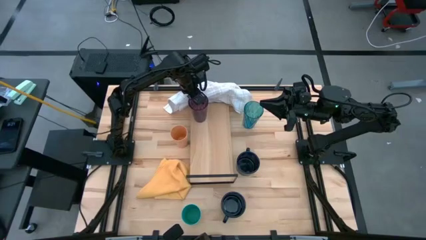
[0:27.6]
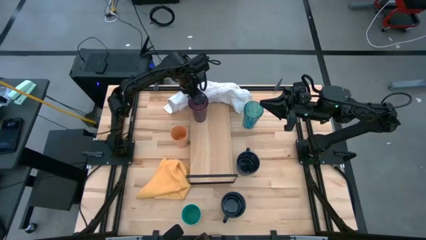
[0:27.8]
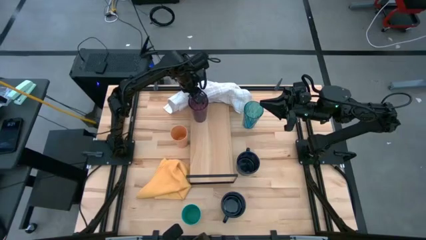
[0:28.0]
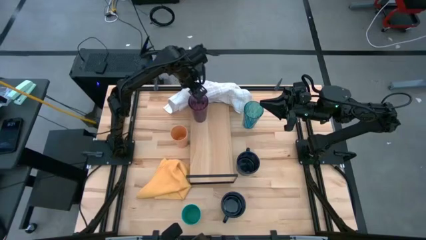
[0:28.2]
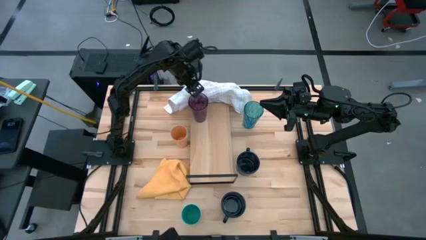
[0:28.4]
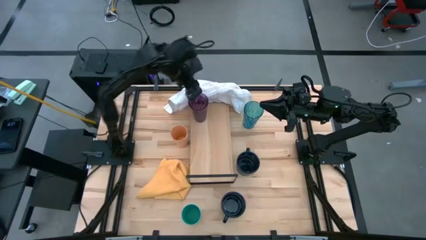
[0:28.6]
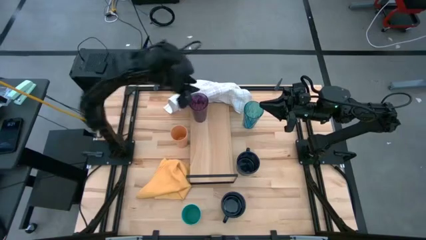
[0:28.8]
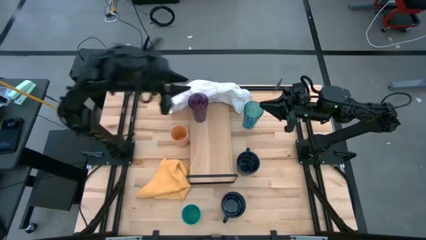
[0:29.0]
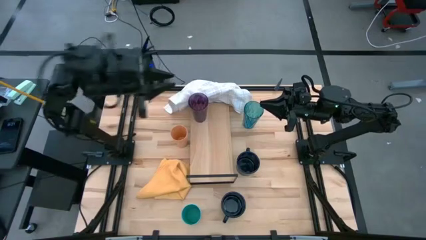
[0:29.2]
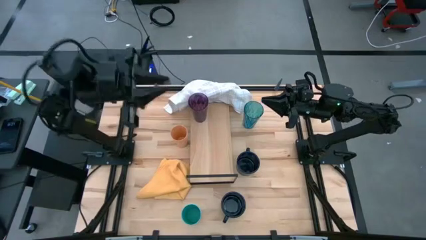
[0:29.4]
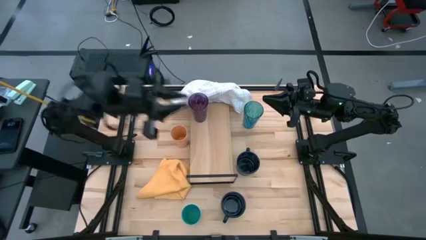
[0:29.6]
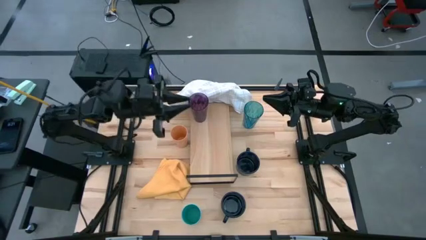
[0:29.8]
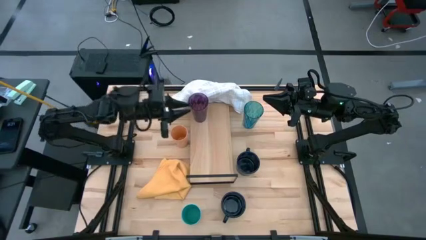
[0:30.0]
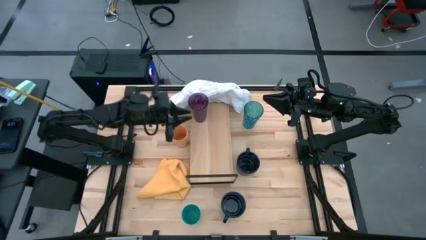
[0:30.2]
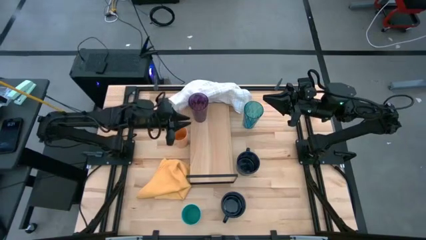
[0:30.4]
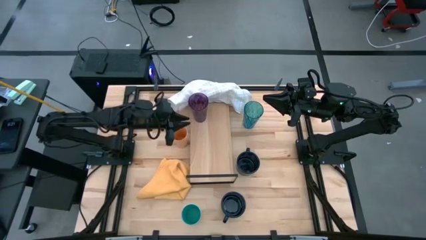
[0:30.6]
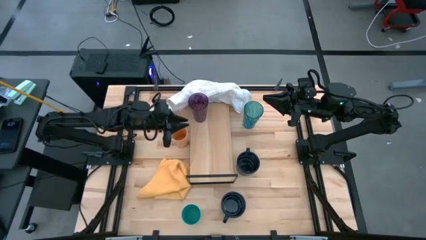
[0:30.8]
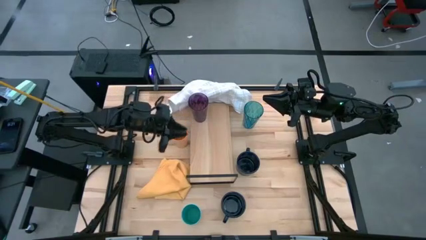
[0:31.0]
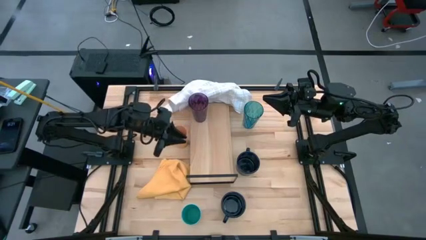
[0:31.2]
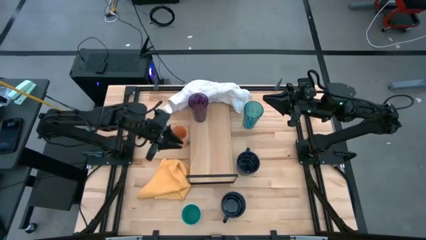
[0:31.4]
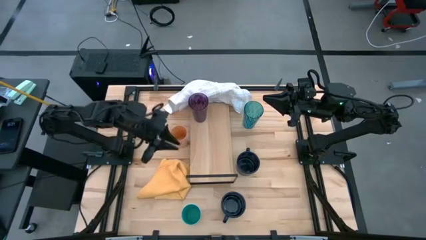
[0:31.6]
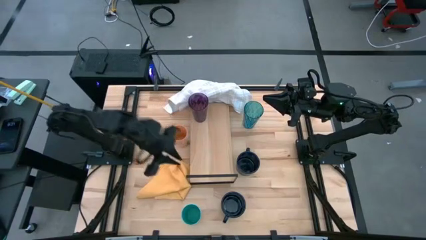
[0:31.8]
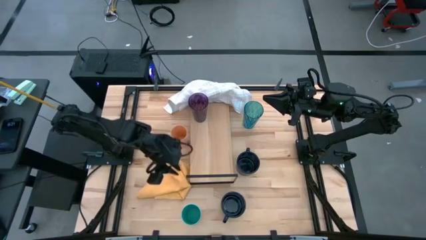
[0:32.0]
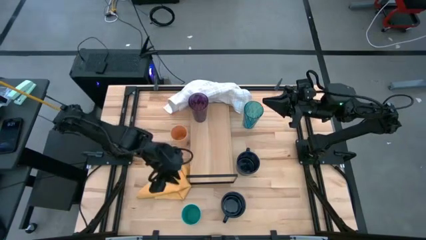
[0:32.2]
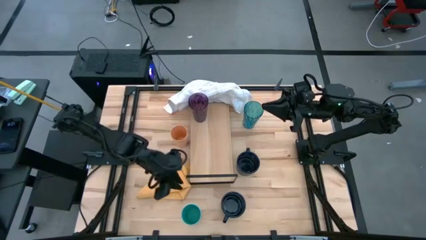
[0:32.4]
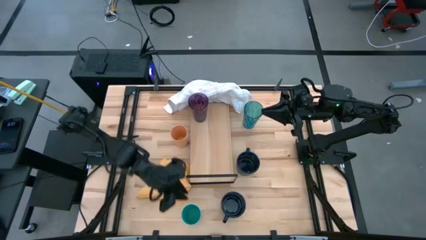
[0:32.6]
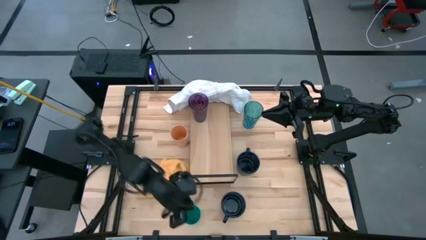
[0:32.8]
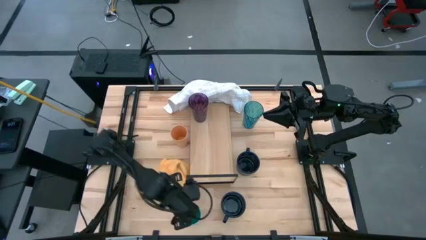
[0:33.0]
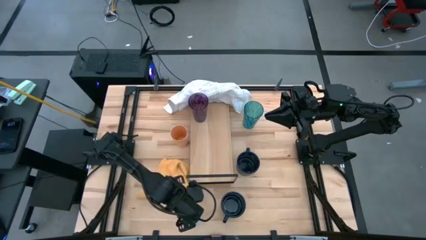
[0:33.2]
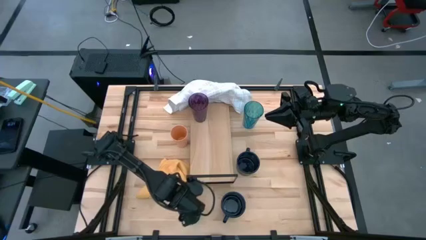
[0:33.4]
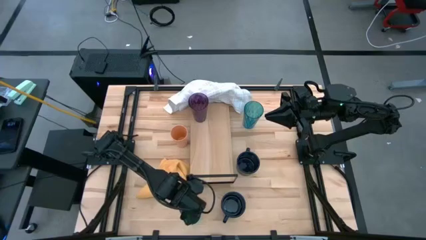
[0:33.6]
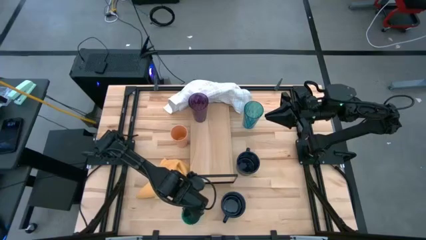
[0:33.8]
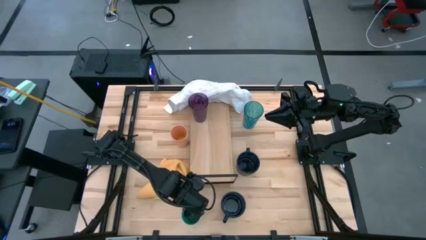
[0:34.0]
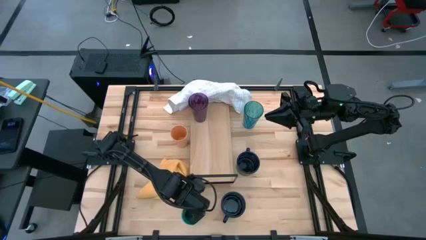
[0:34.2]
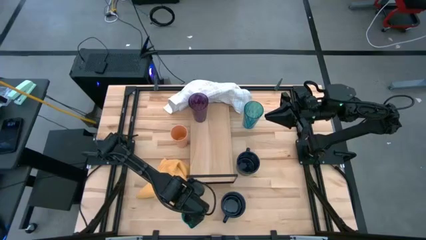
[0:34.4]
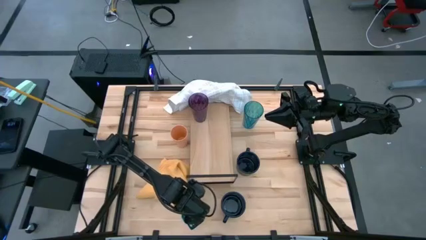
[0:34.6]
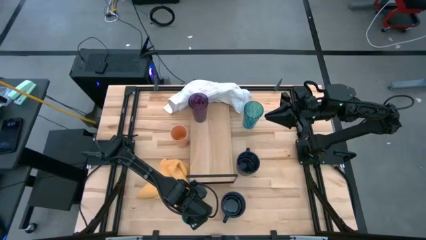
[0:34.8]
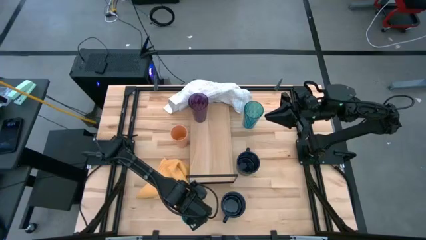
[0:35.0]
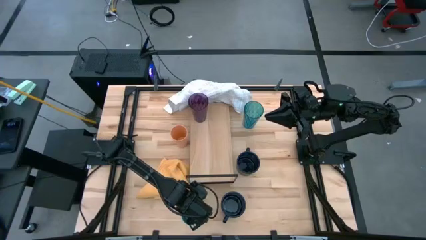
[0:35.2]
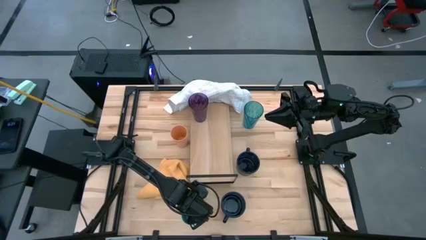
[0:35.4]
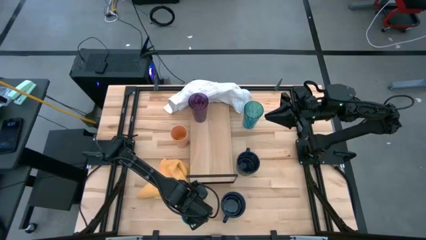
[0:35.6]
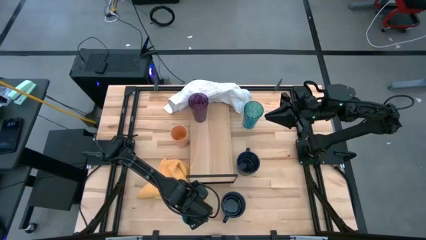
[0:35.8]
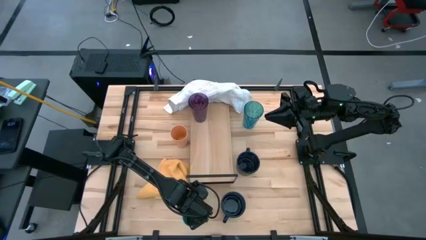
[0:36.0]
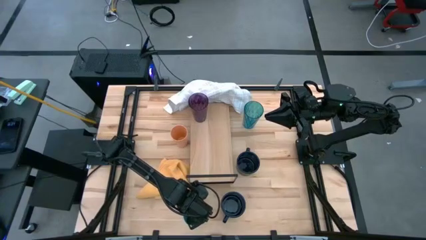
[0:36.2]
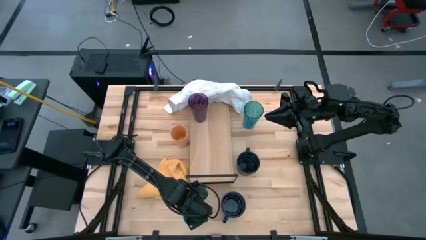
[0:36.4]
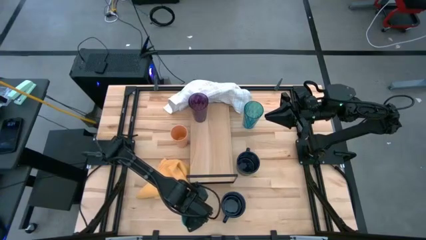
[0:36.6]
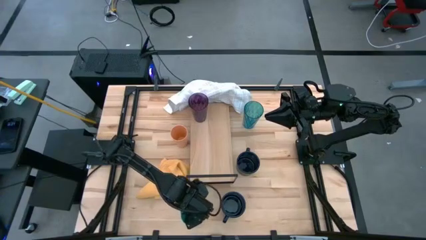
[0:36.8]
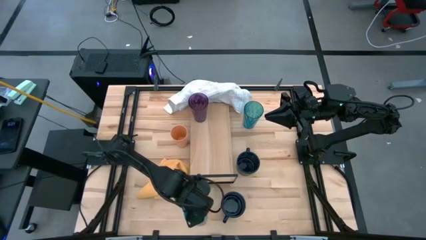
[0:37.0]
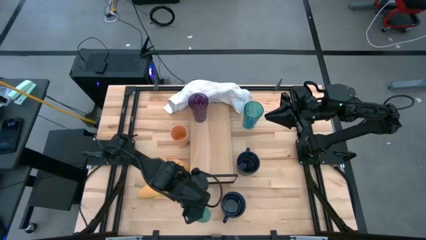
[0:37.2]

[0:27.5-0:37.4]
Task: Stack small to large cups/mugs on shelf
Put the light blue cup on the shelf

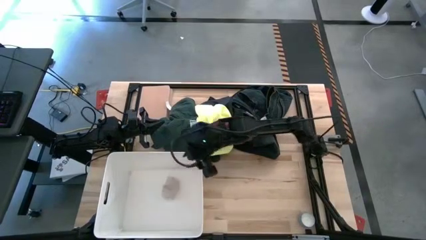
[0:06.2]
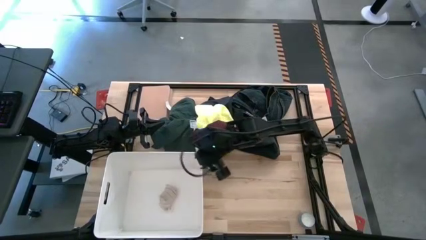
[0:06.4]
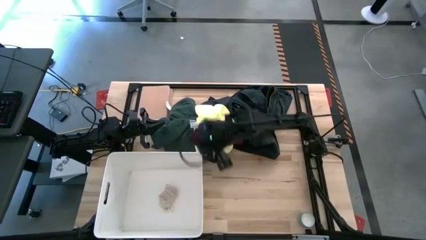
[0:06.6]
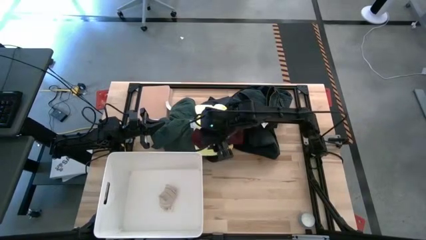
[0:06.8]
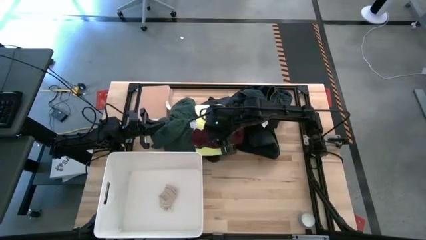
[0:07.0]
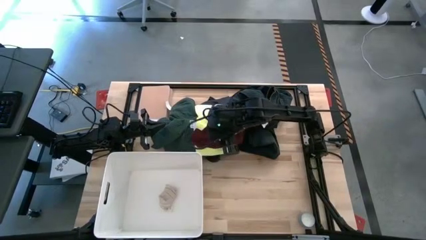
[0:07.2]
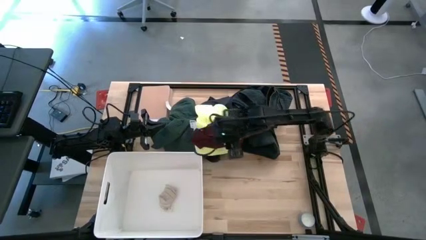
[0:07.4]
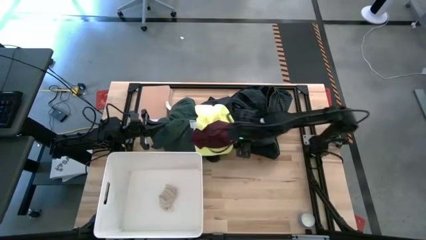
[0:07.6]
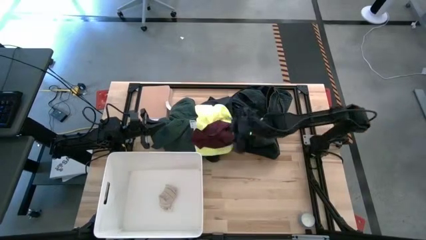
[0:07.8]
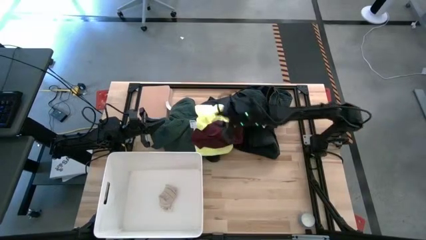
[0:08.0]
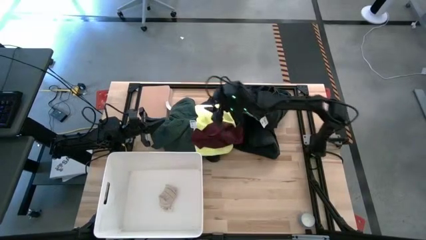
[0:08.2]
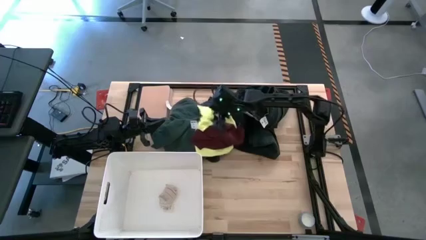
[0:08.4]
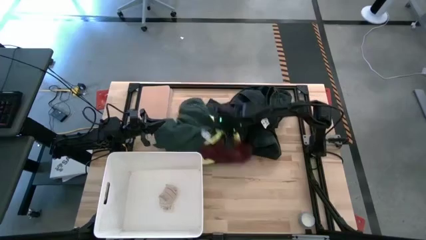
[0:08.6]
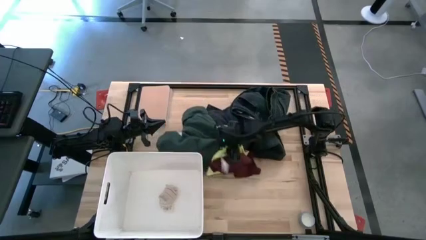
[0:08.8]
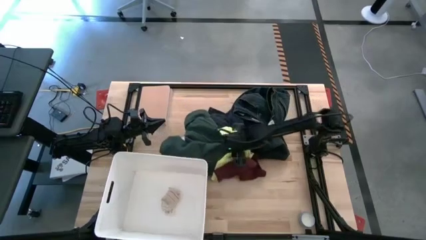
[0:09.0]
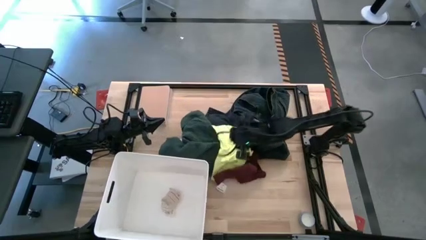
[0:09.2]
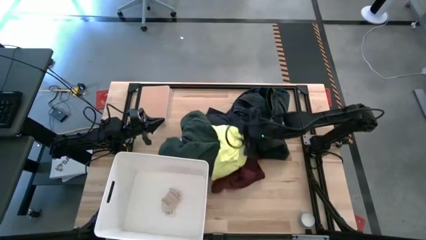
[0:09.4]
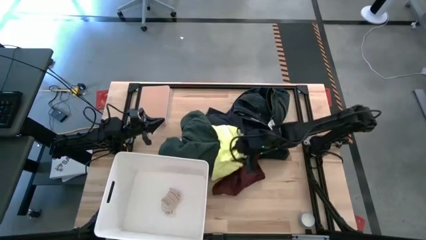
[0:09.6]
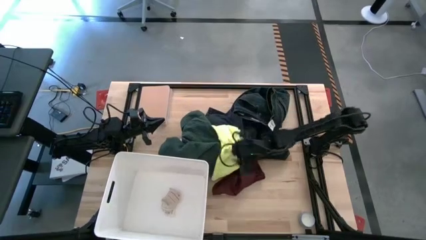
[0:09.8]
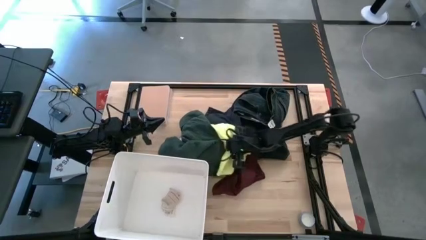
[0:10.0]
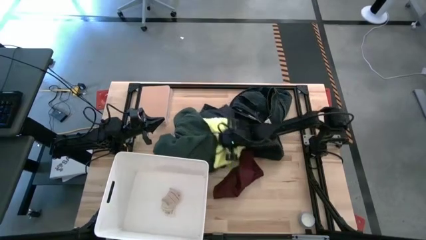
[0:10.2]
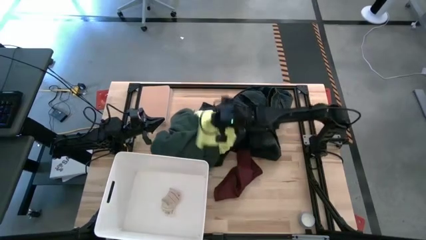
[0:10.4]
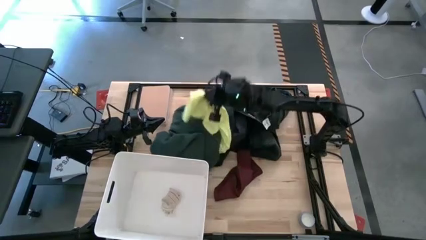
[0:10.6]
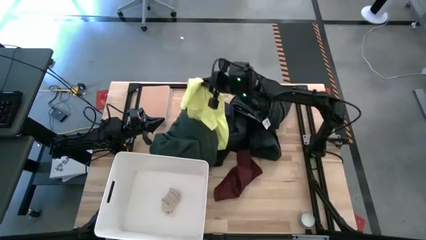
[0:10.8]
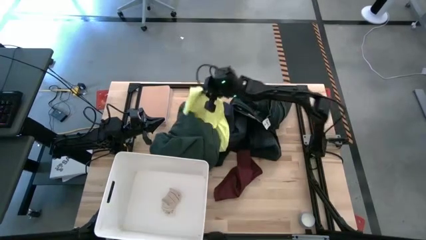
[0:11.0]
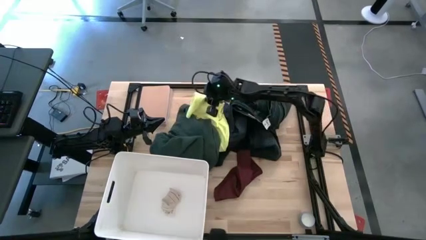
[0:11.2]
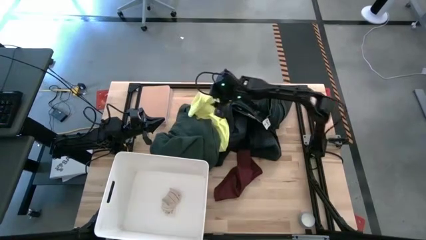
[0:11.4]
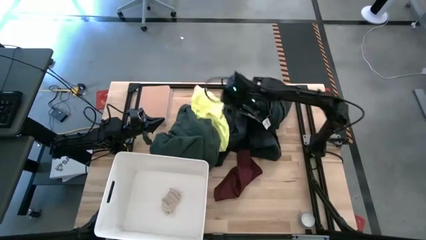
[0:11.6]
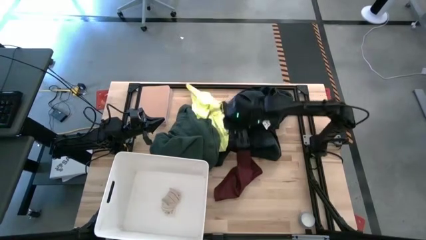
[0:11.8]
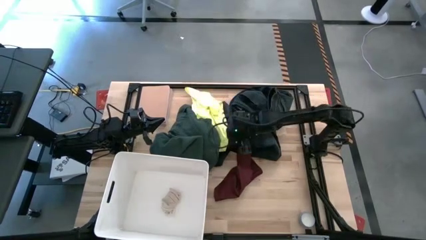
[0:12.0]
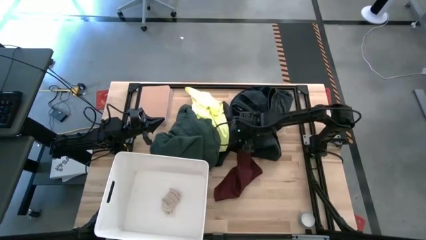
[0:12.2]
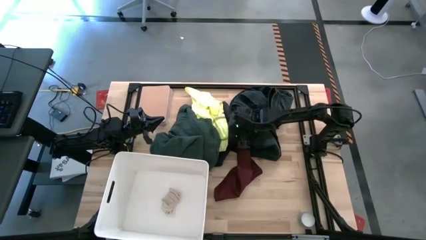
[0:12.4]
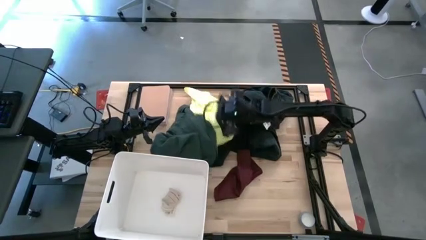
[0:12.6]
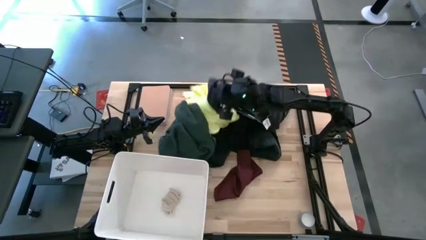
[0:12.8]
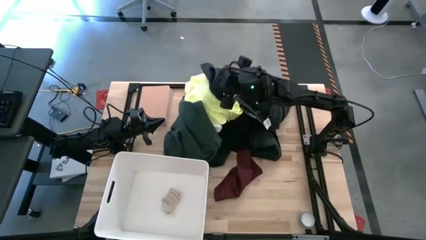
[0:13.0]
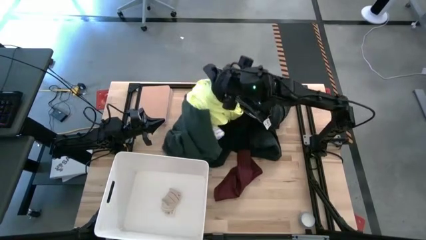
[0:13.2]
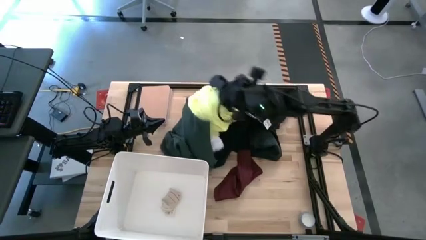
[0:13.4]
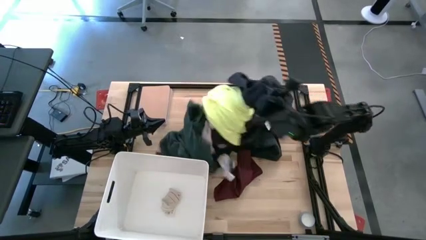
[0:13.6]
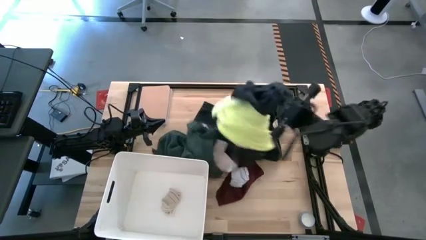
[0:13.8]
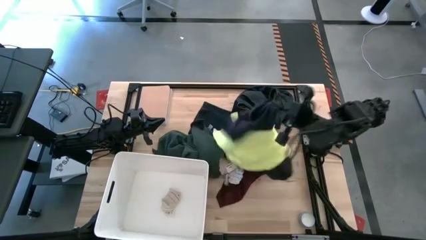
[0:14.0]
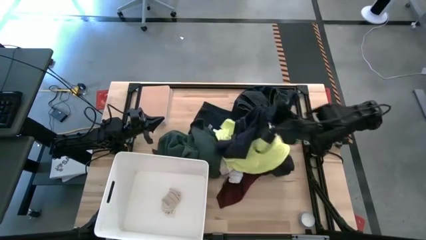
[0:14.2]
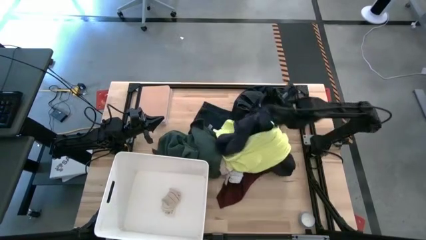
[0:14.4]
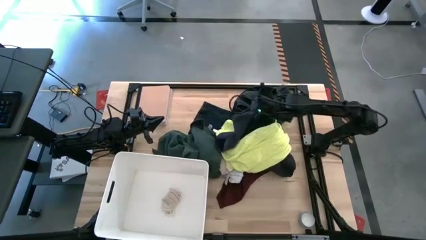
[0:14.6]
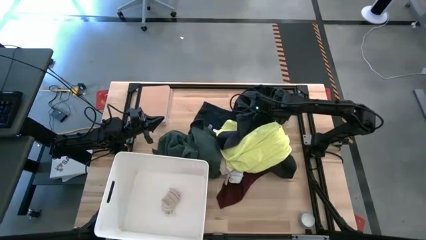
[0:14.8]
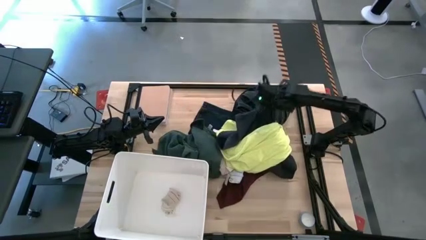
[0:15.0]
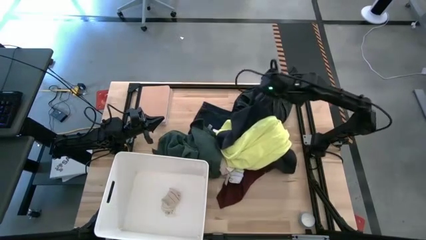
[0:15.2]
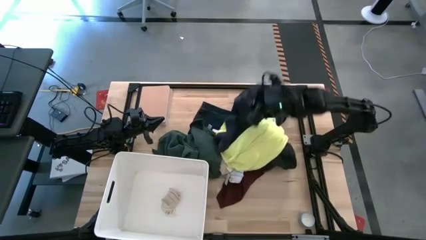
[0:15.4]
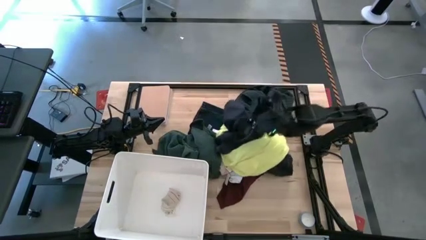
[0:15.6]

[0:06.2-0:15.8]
Task: Sort clothes
Adjust the clothes on the table
